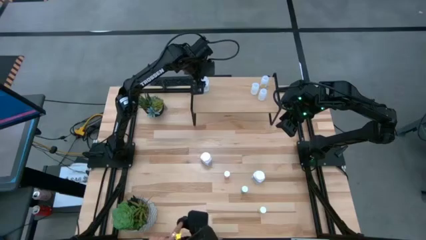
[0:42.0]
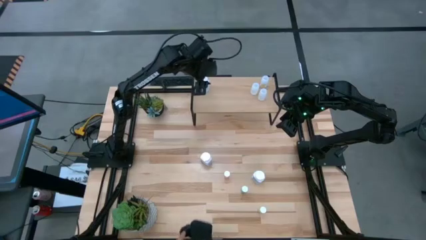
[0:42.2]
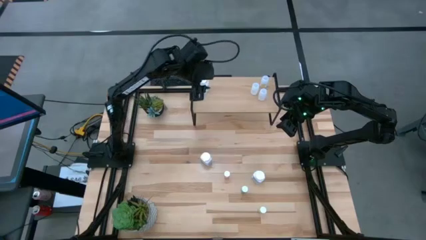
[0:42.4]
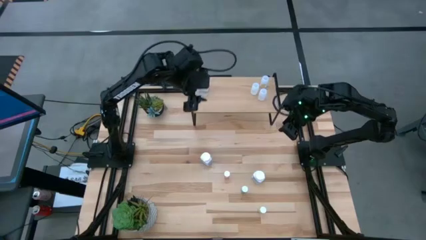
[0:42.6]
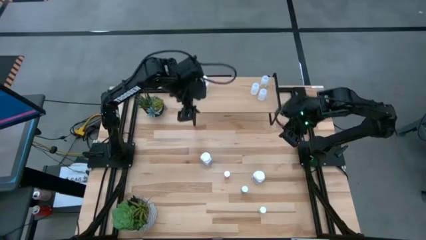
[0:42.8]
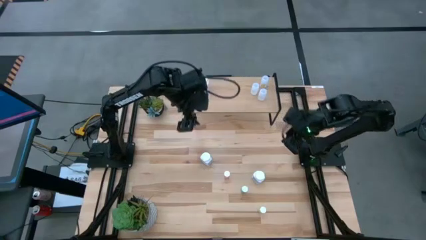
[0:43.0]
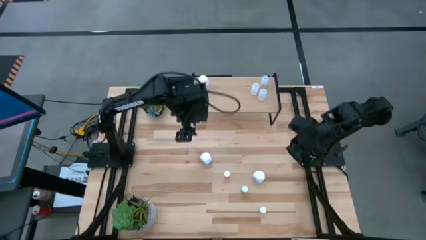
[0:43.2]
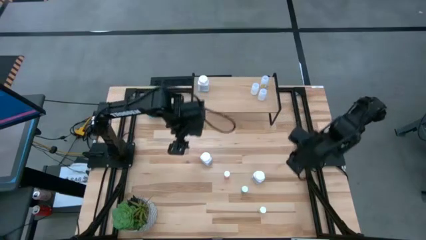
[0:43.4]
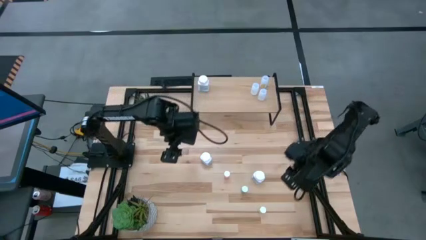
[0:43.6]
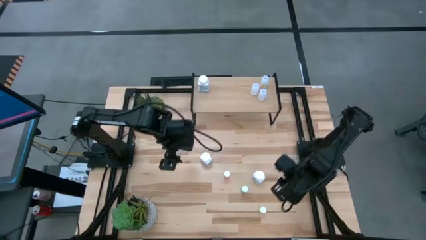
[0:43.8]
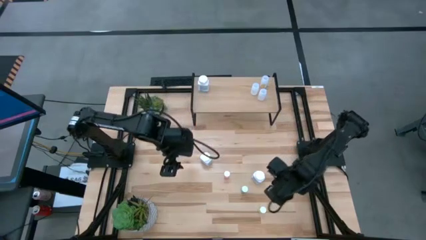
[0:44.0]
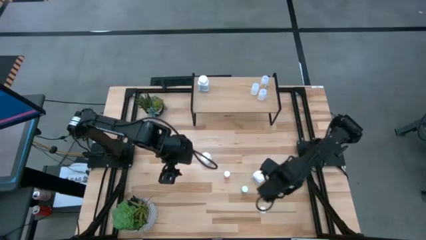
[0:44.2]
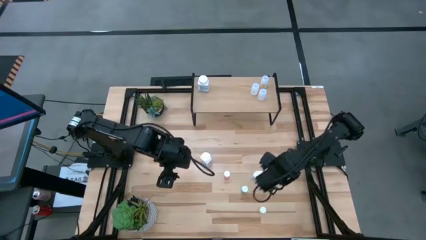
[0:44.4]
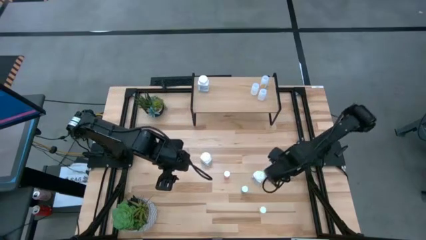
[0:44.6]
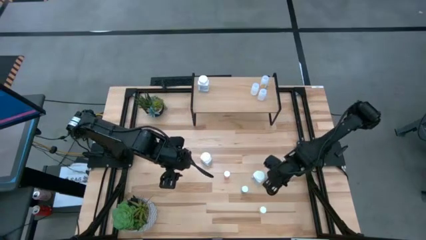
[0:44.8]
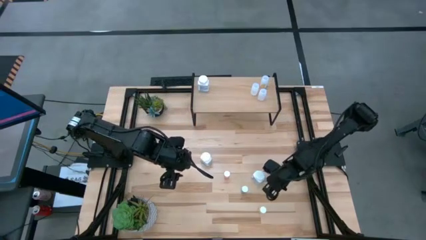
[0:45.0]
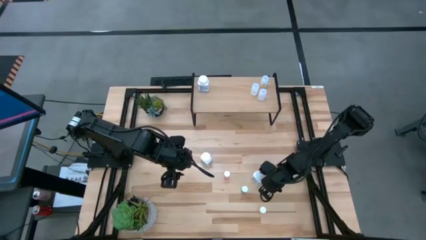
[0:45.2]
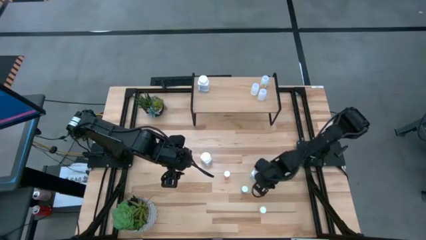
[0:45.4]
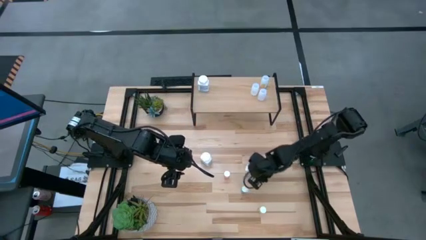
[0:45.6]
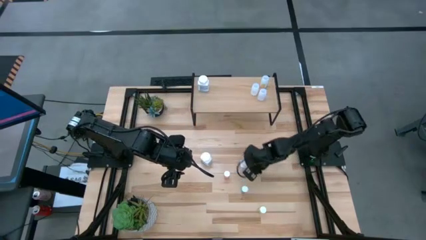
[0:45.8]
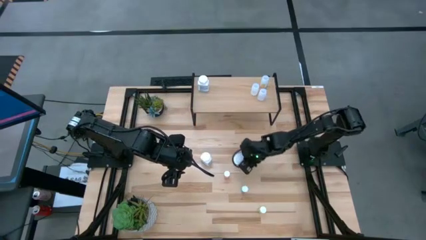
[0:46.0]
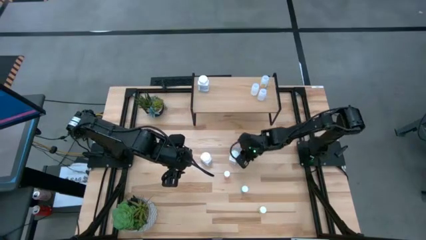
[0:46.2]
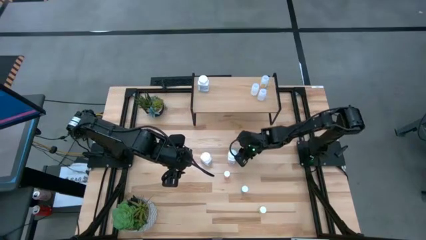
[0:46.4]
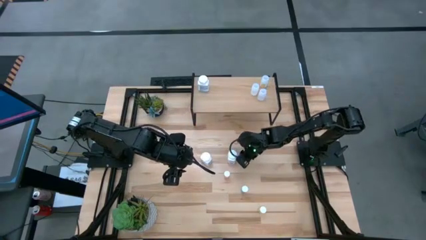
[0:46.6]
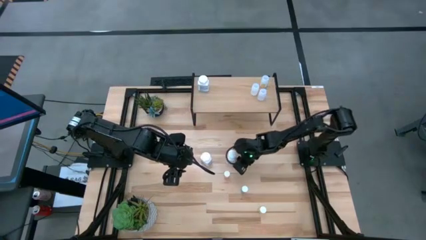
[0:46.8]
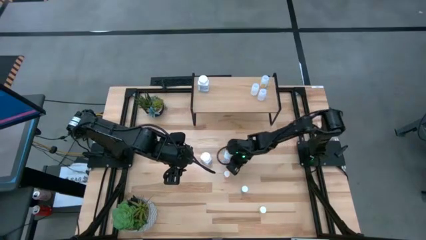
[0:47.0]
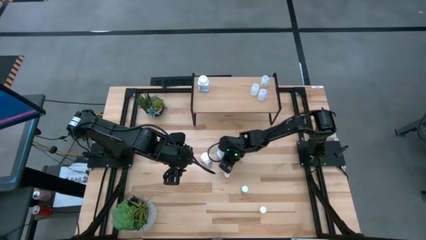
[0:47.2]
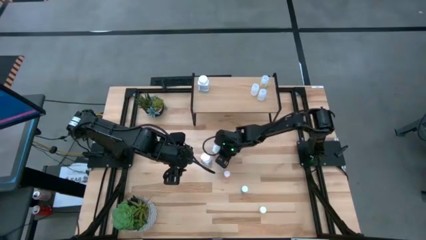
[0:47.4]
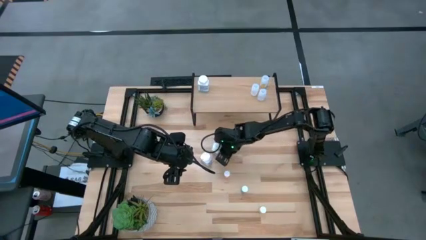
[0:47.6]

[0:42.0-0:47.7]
Task: Pick and place medicine bottles onto shelf by color
Move the bottom white and blue pill bottle near the shelf

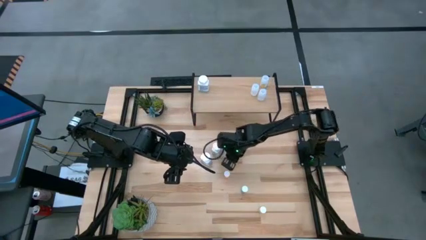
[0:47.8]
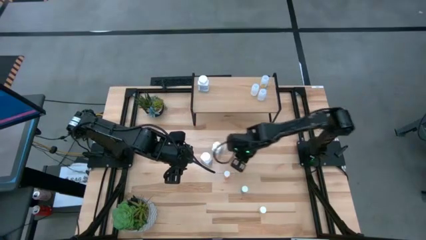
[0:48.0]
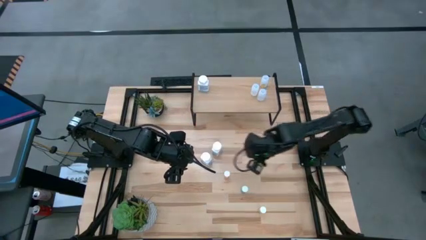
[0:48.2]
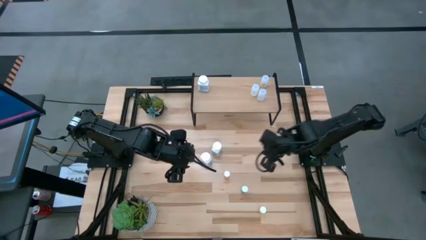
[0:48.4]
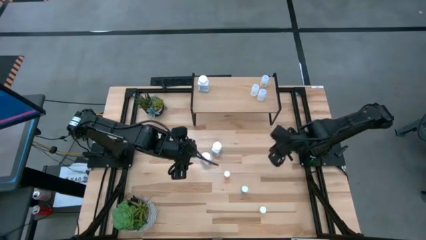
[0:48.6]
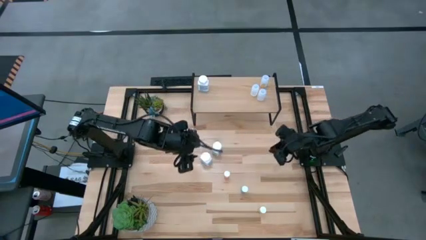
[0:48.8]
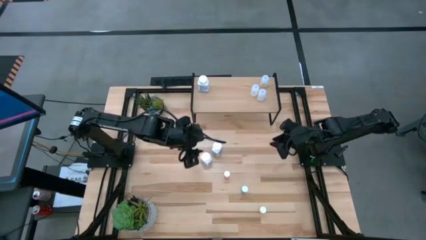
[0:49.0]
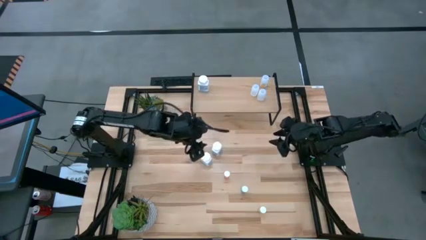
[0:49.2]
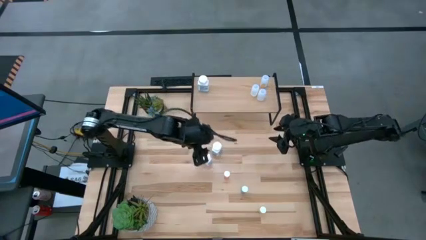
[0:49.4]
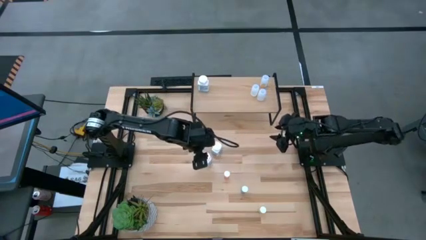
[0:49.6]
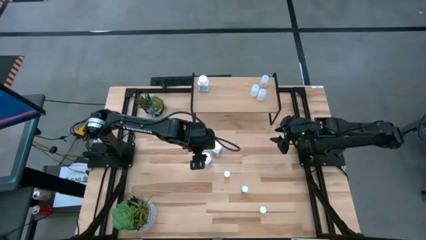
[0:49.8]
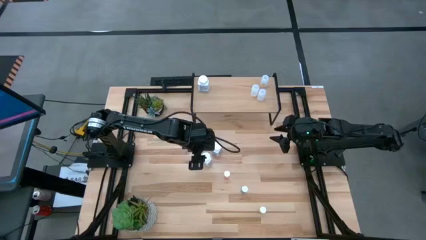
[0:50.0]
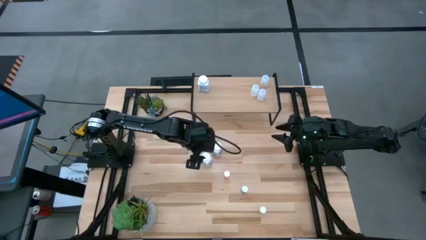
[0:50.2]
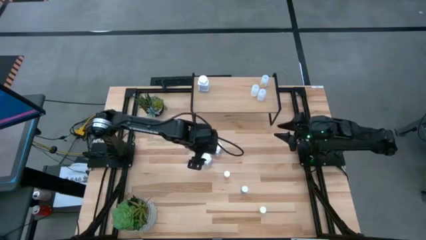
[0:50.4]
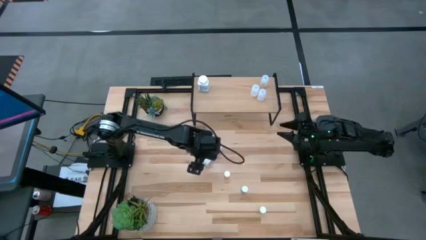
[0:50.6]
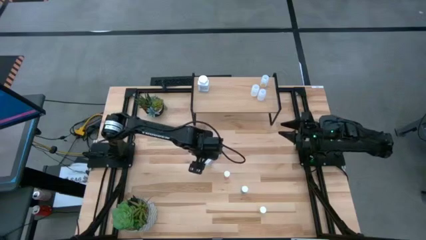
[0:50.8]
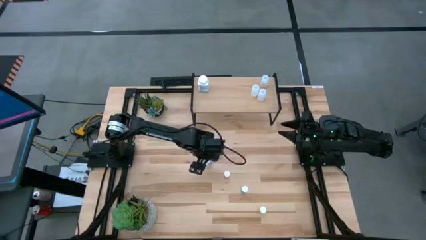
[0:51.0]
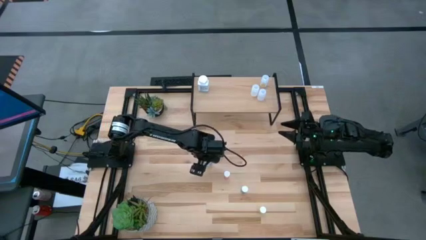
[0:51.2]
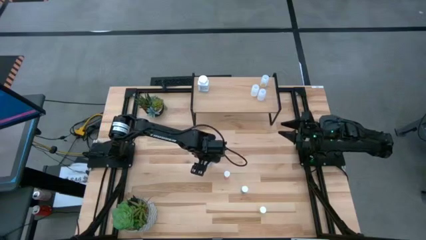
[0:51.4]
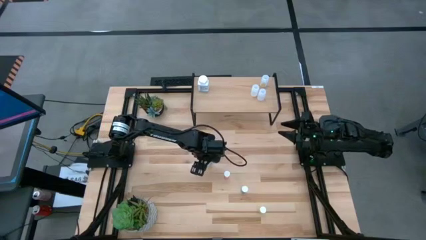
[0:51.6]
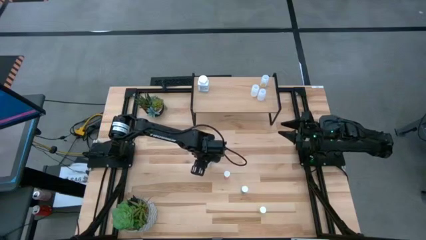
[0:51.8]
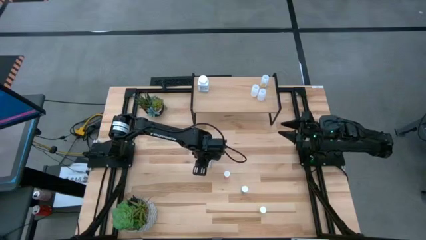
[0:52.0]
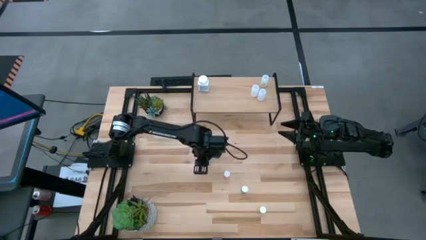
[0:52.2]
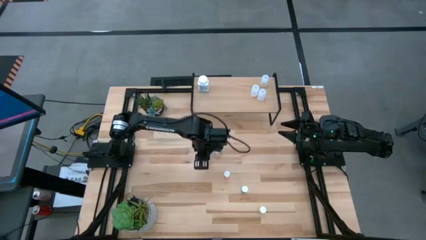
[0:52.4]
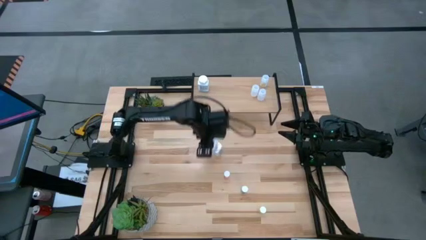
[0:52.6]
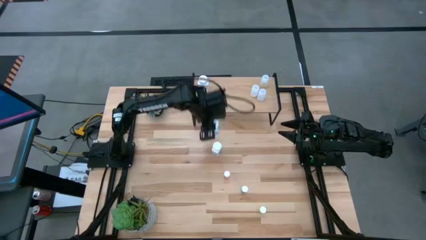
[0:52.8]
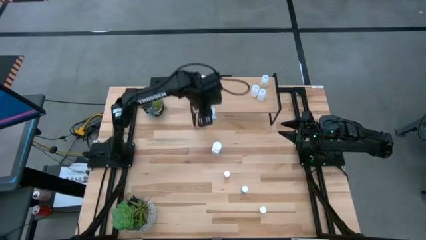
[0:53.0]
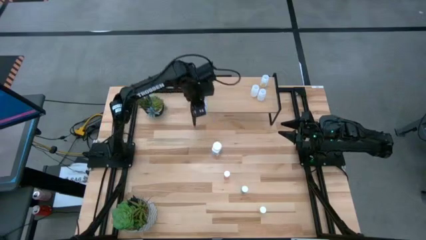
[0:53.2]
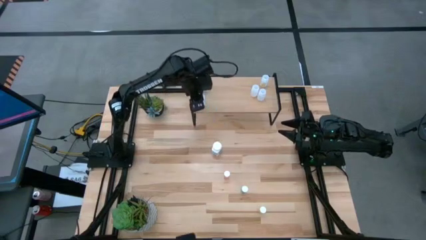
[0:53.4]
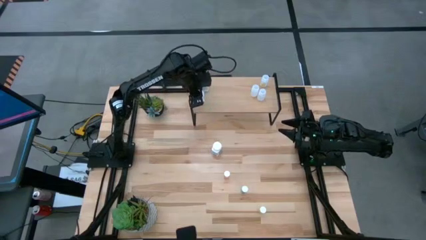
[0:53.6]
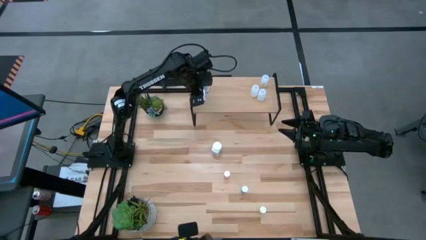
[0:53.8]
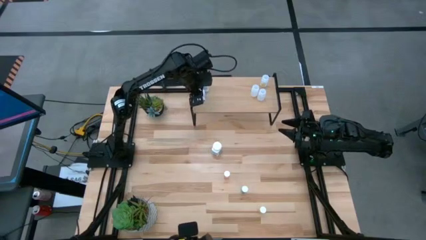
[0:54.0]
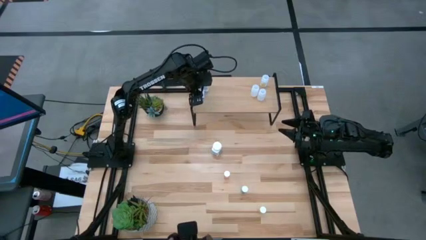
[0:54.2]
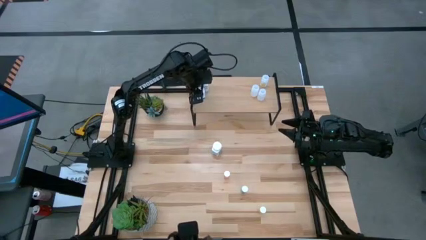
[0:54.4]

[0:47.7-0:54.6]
Put the left white and blue pill bottle on the shelf aligned with the other white and blue pill bottle

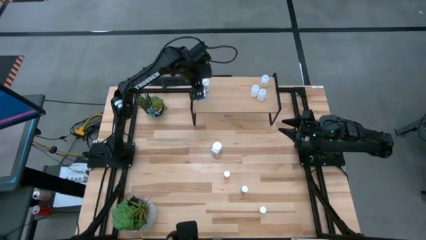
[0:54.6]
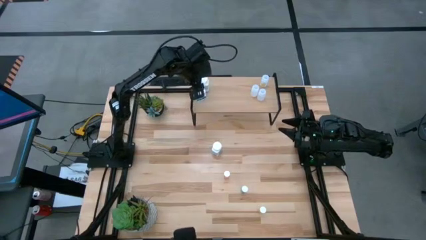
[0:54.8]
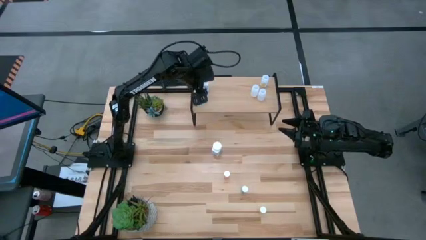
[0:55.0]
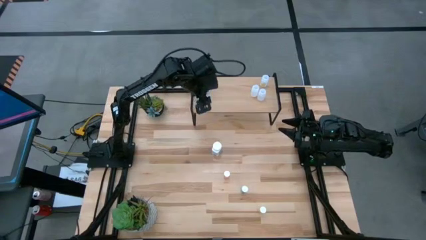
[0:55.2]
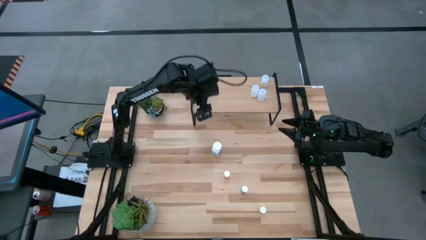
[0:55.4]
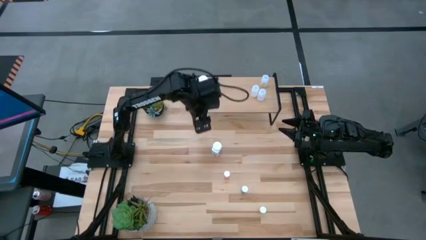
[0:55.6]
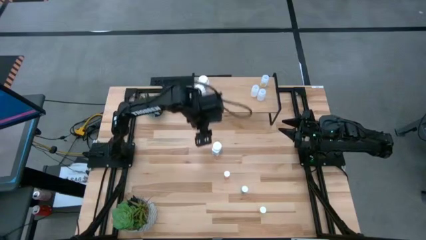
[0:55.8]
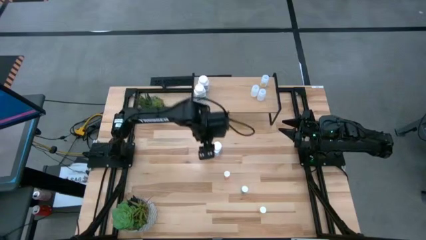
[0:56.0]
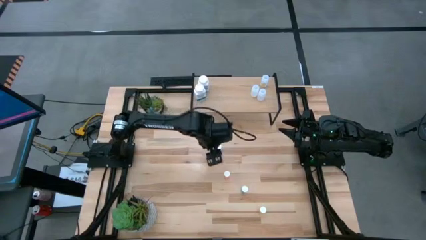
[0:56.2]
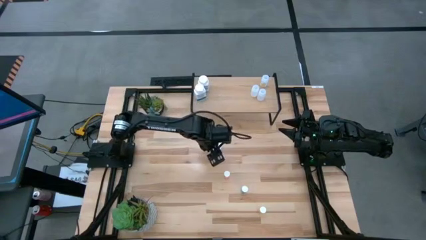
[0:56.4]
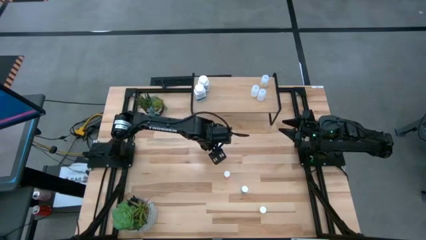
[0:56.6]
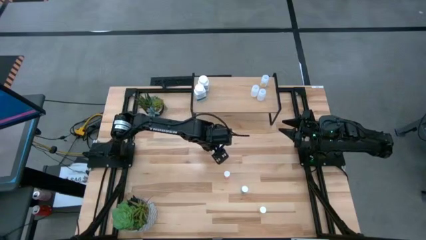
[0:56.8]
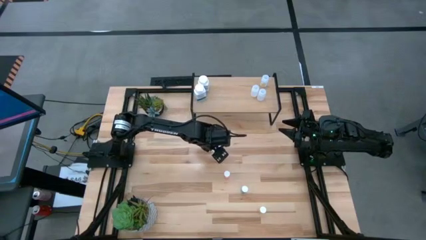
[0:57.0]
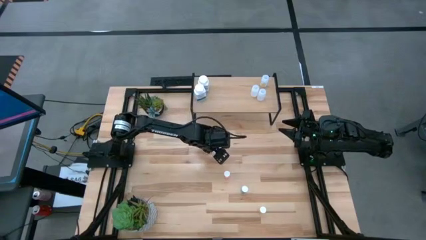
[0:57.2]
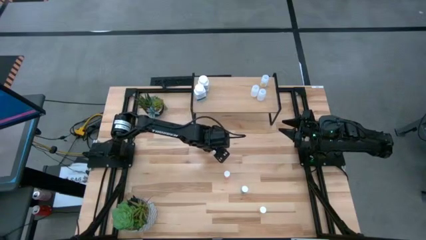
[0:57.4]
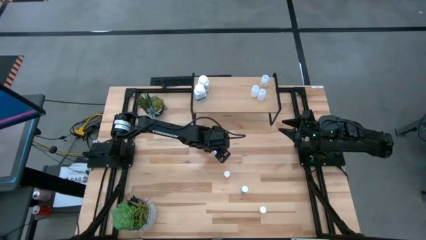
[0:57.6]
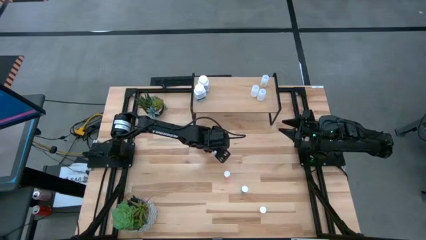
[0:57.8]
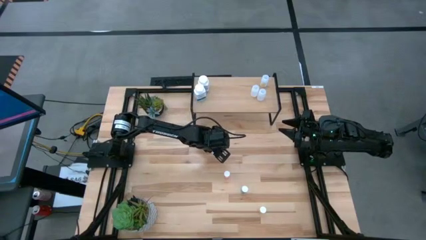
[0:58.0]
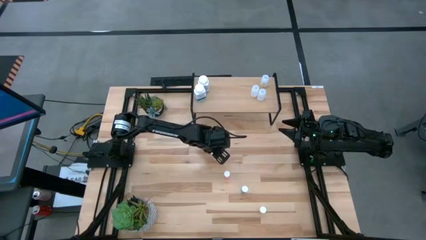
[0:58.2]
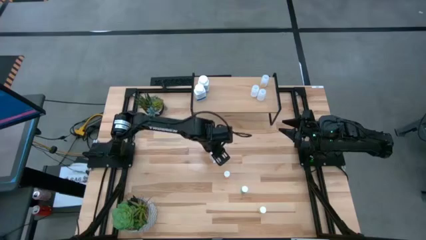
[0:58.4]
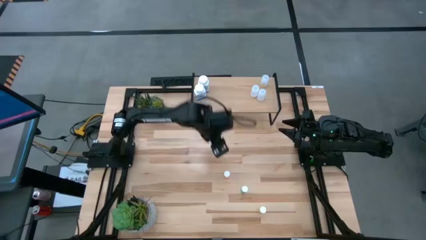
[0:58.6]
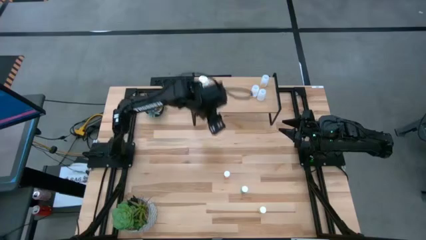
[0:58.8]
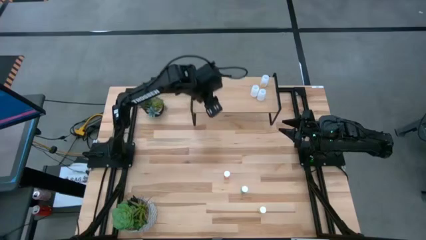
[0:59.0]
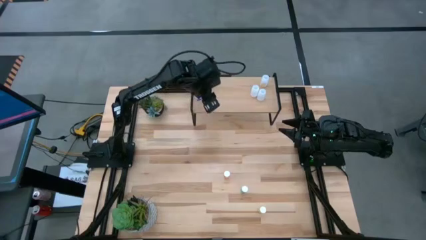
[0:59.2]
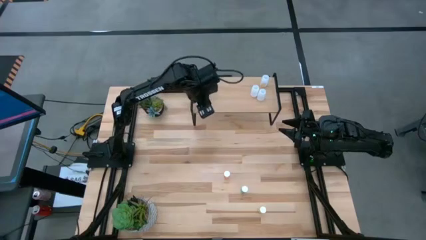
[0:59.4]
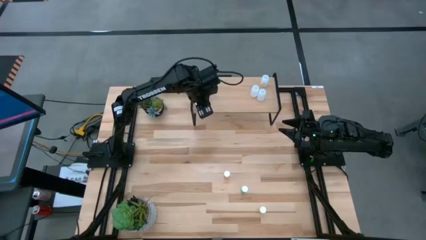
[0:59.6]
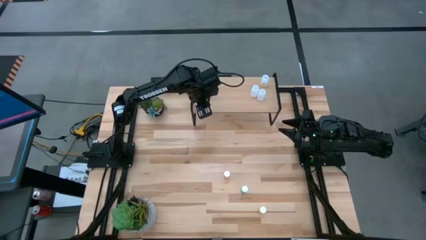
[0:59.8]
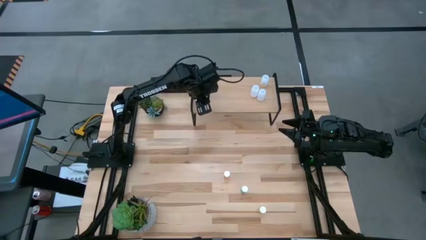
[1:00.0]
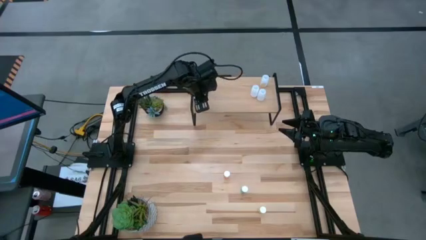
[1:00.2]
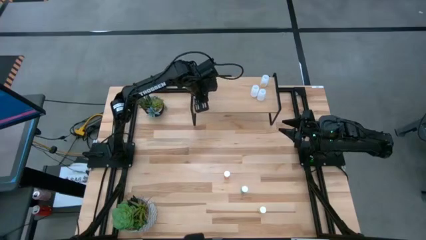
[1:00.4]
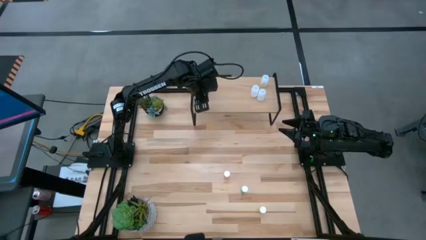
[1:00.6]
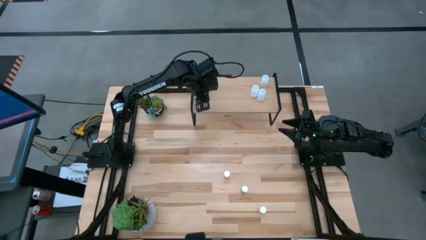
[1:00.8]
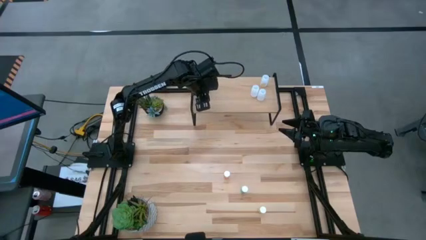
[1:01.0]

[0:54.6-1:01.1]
Put the white and blue pill bottle on the shelf aligned with the other white and blue pill bottles
